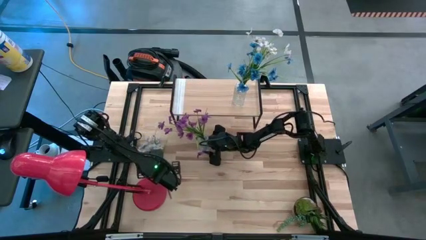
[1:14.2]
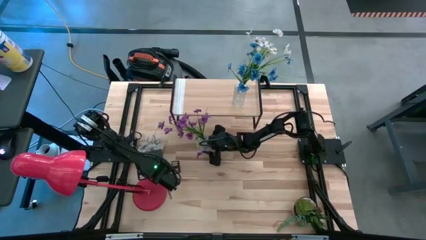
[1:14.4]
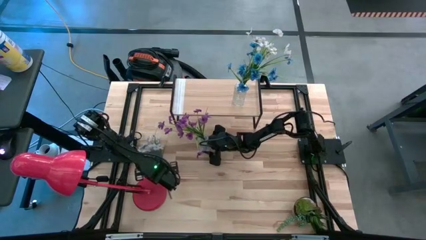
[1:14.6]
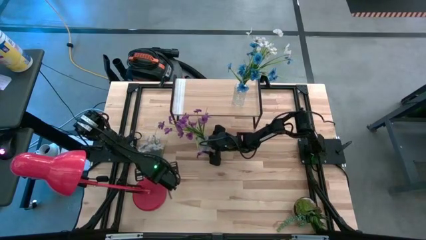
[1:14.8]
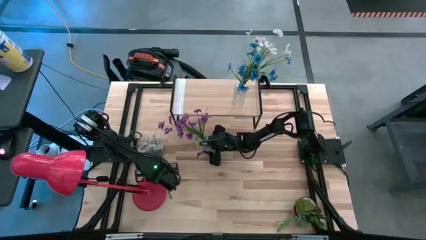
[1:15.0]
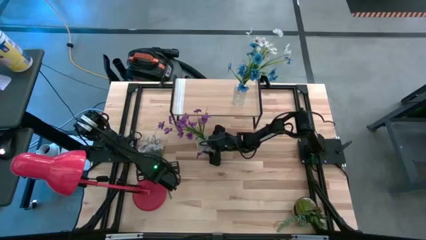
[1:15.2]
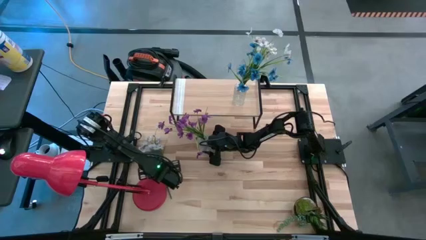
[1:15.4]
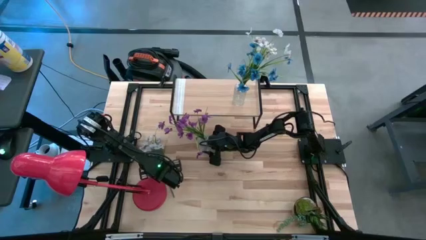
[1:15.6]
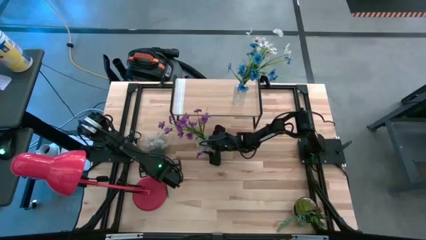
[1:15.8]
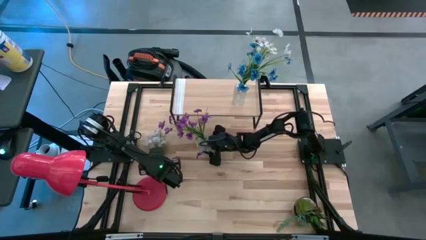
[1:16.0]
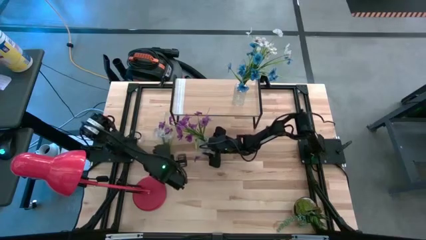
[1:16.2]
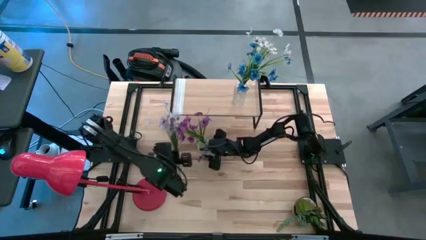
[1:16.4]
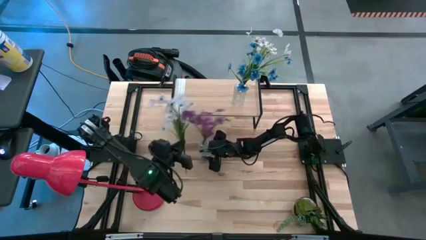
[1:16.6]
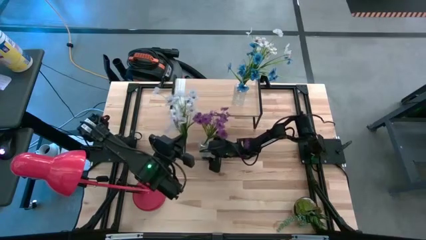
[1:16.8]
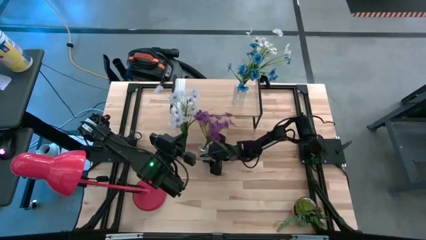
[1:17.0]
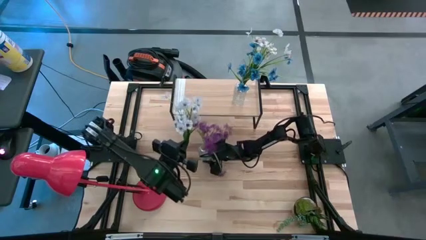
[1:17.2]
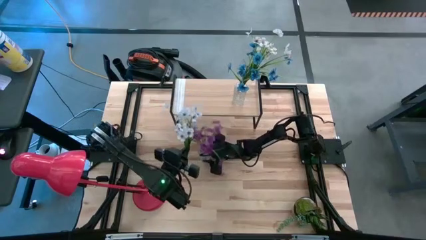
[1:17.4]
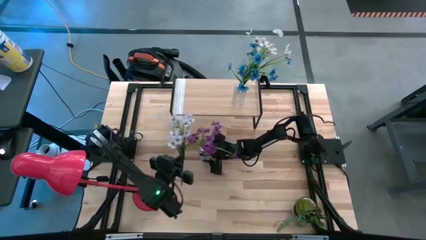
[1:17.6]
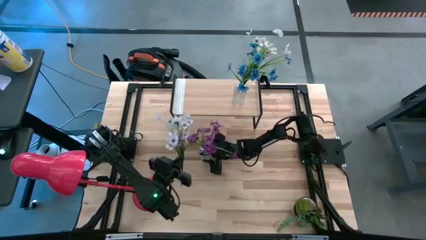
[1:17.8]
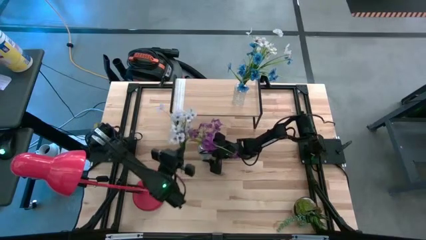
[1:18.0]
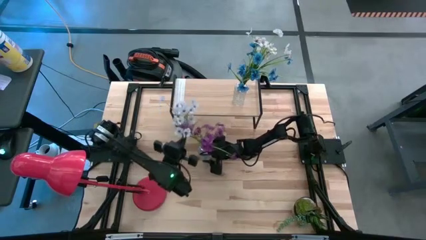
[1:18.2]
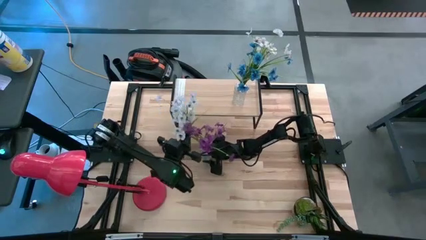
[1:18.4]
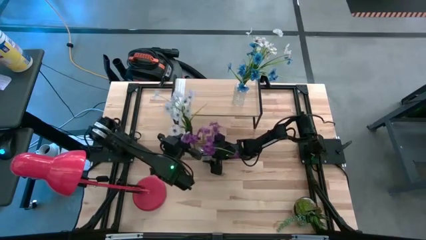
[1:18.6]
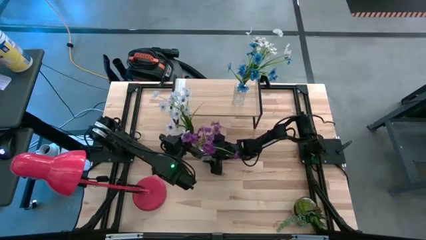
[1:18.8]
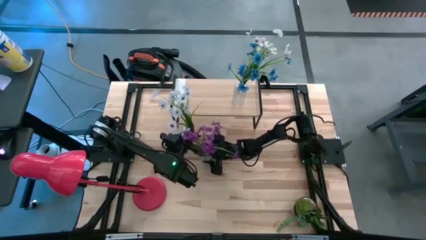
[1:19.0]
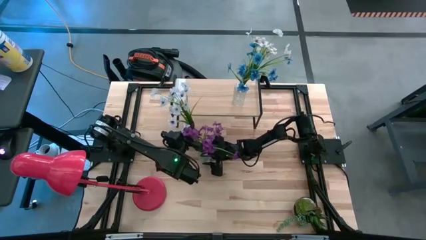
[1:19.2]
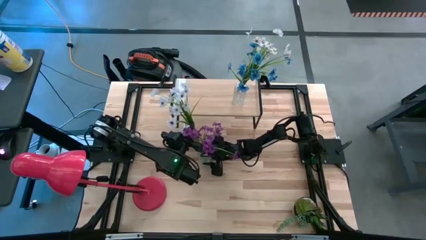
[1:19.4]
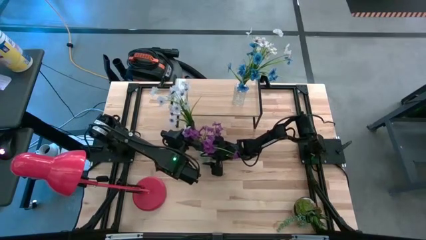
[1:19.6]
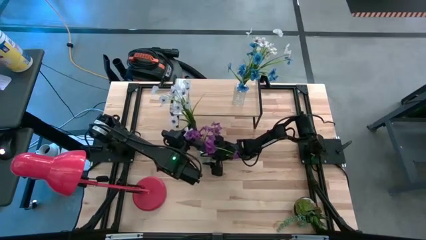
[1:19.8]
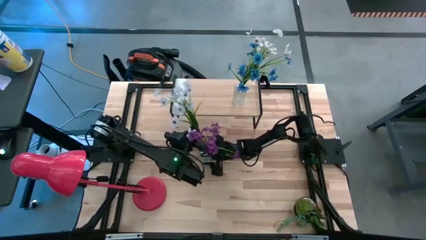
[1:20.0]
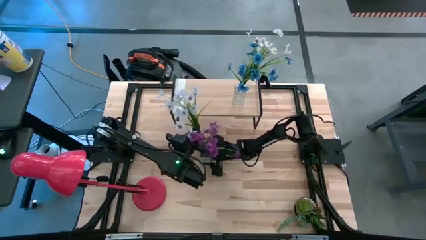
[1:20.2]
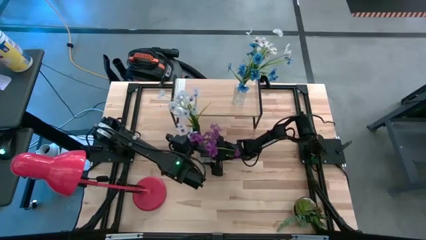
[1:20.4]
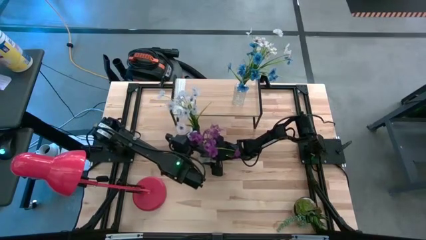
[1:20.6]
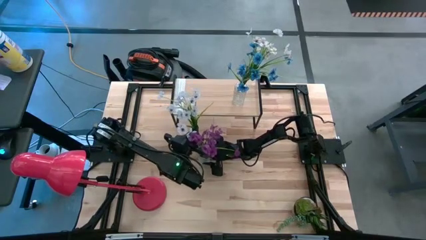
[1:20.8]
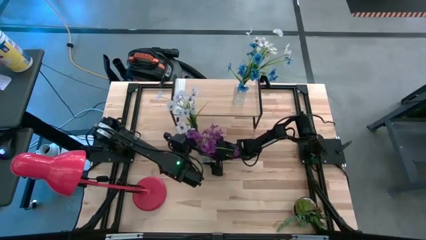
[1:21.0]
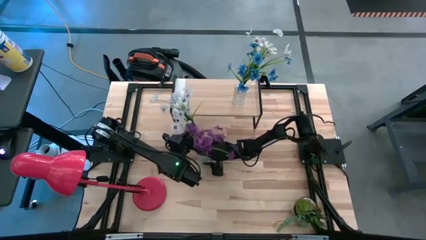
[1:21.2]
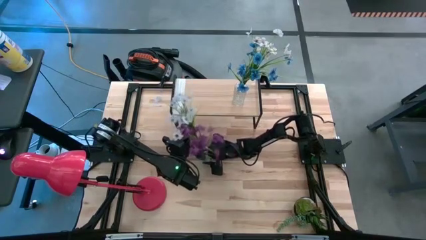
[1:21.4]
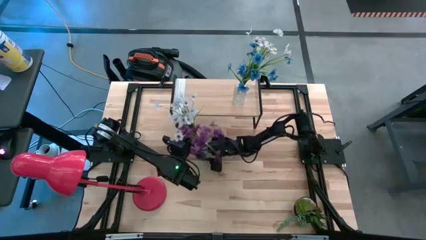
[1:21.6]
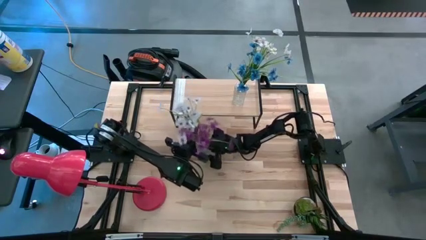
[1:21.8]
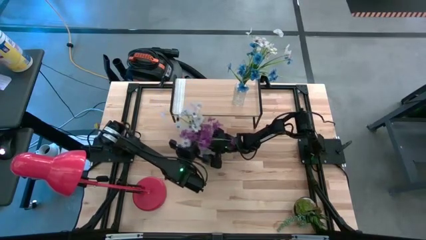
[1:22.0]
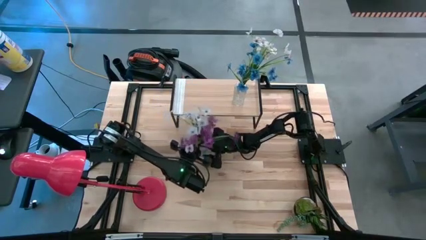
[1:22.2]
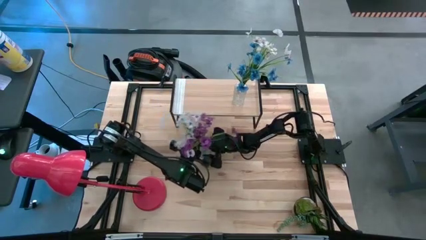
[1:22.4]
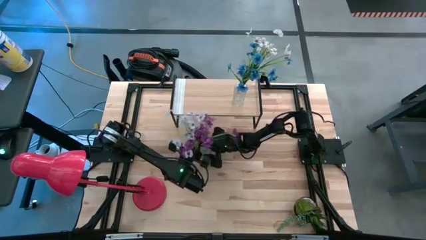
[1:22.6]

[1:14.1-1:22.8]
Task: Pick and place flowers into a vace then onto a shelf
Put the white flowers into the transparent vase

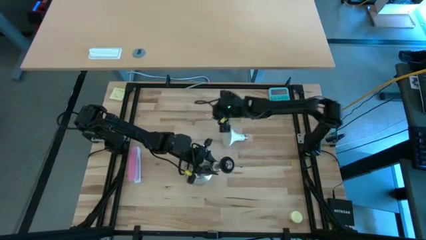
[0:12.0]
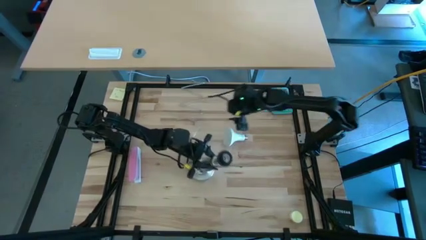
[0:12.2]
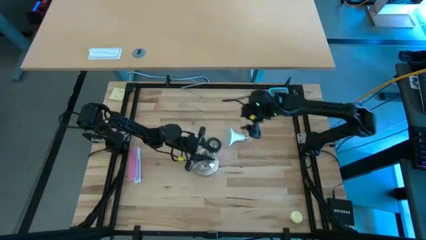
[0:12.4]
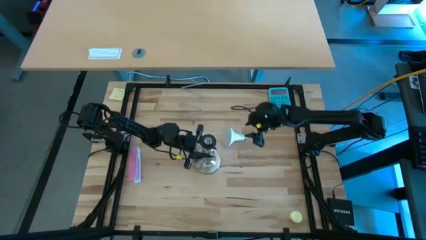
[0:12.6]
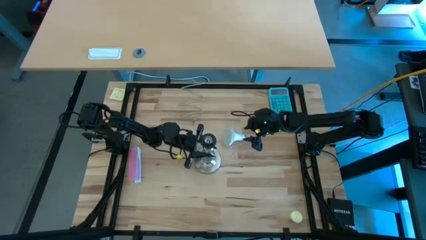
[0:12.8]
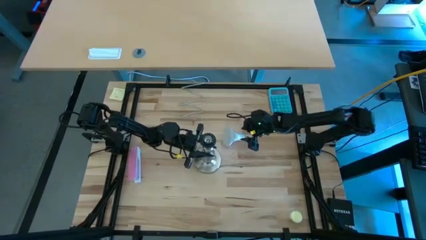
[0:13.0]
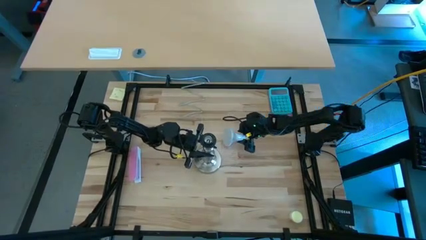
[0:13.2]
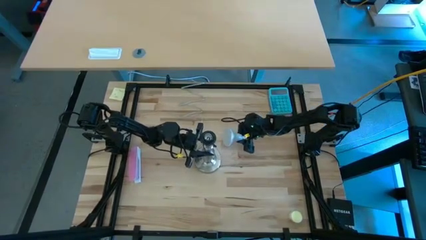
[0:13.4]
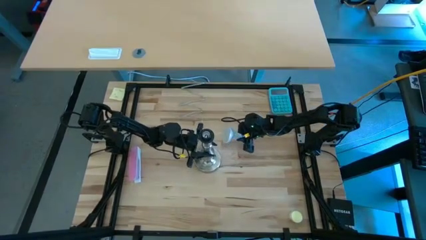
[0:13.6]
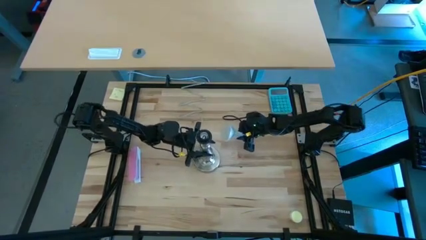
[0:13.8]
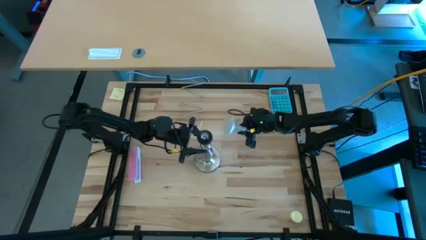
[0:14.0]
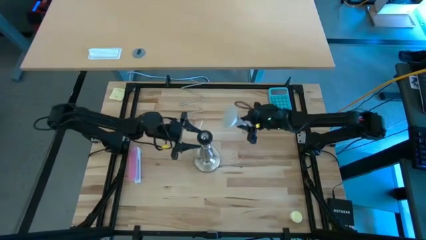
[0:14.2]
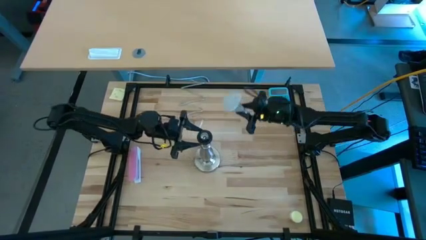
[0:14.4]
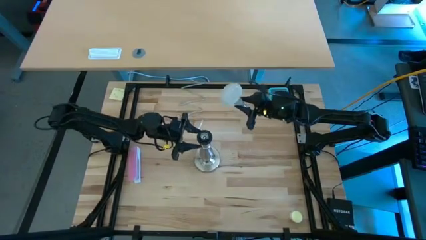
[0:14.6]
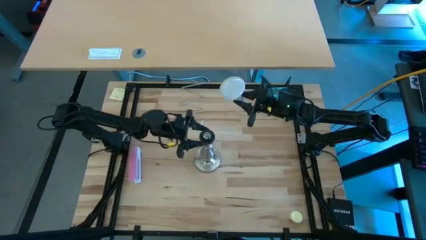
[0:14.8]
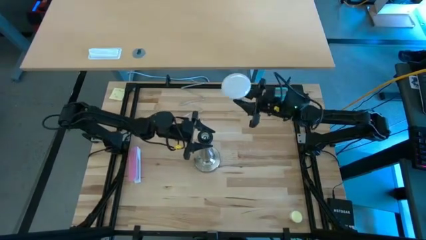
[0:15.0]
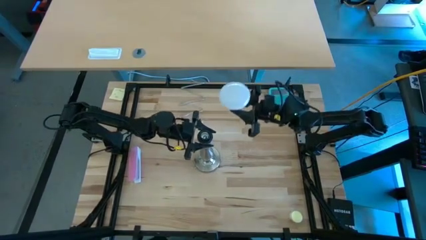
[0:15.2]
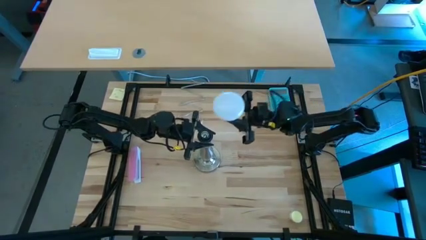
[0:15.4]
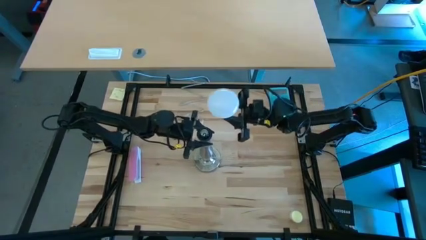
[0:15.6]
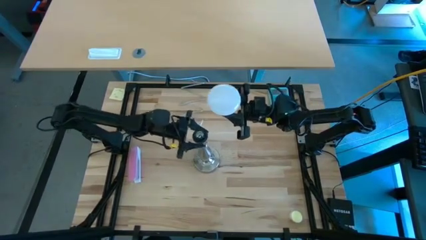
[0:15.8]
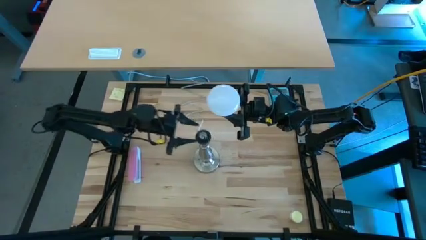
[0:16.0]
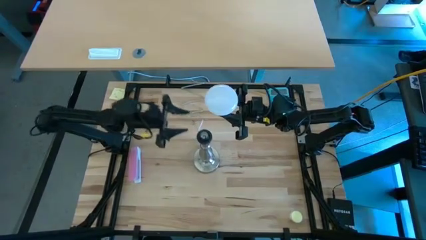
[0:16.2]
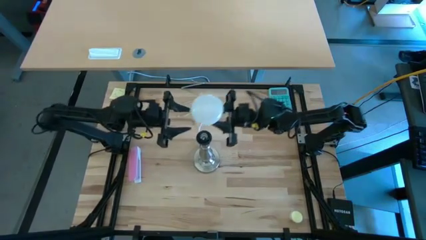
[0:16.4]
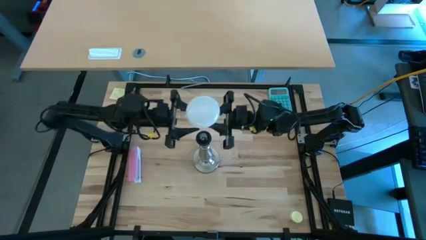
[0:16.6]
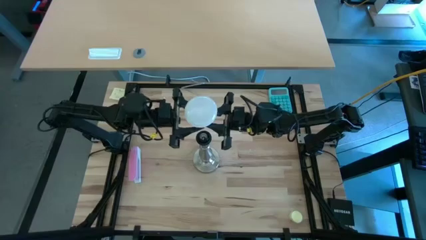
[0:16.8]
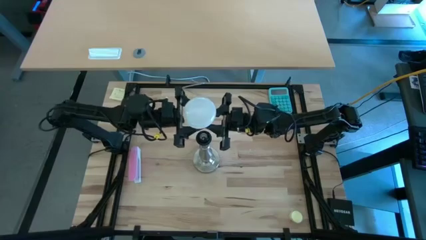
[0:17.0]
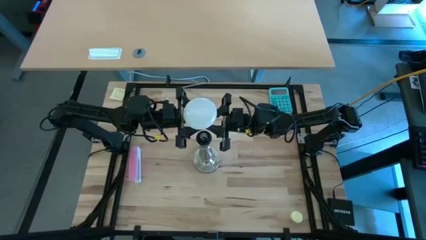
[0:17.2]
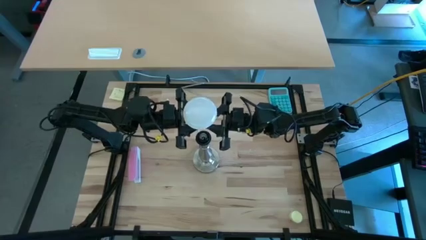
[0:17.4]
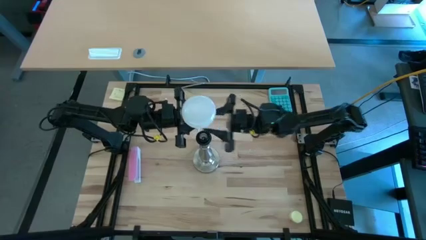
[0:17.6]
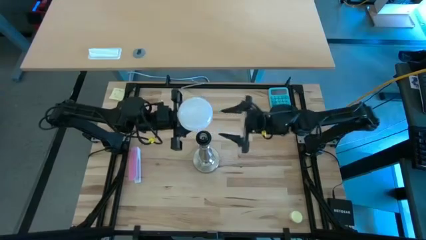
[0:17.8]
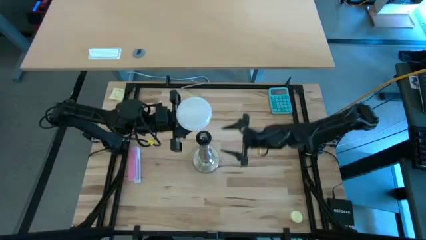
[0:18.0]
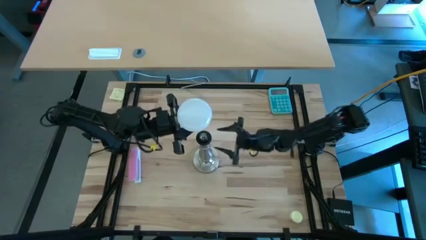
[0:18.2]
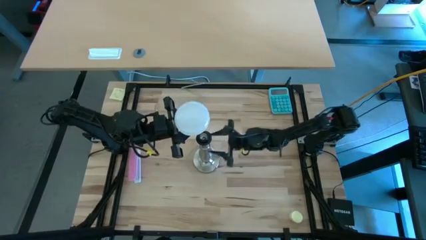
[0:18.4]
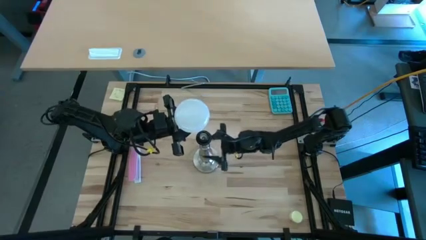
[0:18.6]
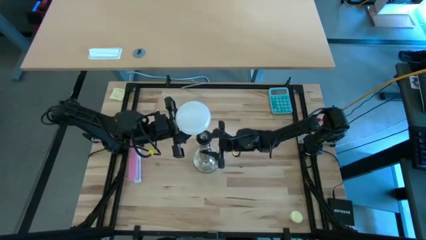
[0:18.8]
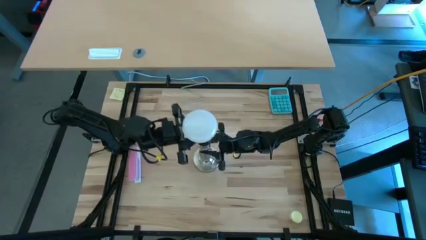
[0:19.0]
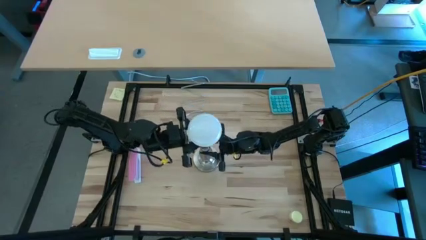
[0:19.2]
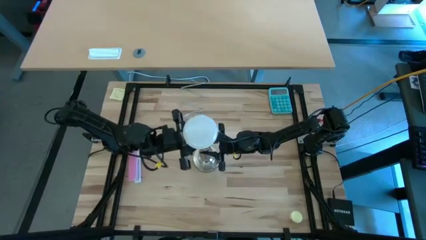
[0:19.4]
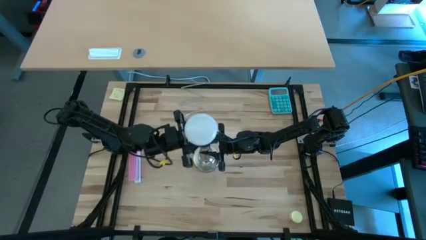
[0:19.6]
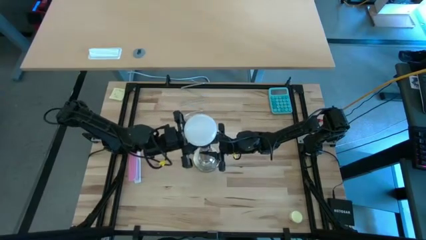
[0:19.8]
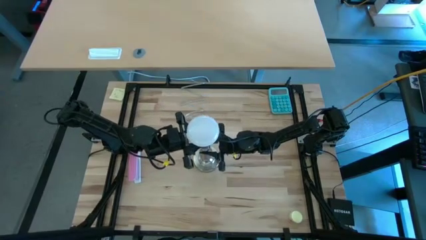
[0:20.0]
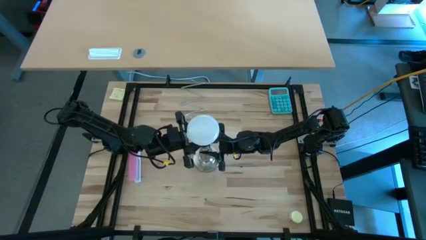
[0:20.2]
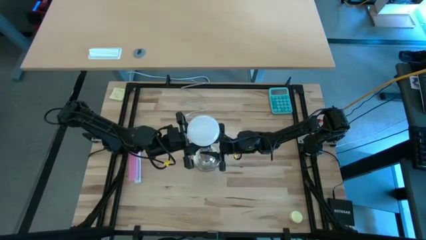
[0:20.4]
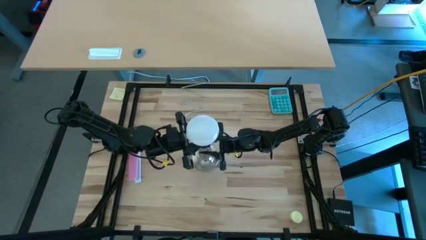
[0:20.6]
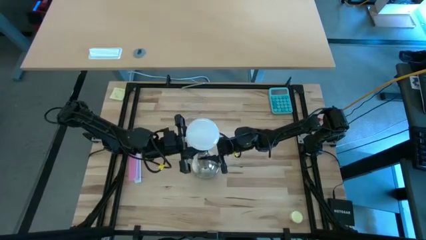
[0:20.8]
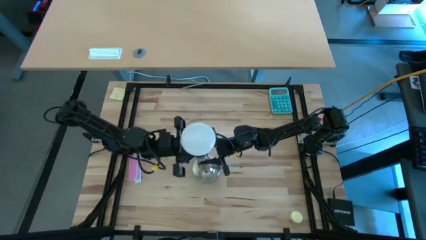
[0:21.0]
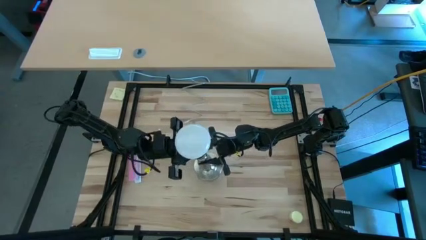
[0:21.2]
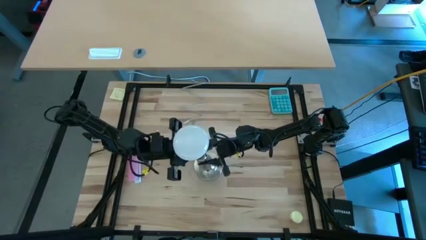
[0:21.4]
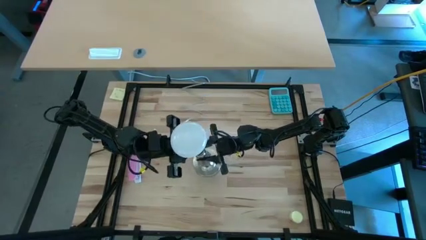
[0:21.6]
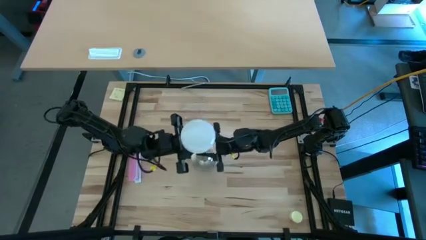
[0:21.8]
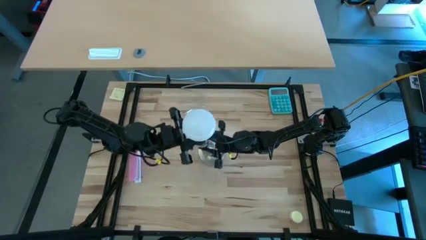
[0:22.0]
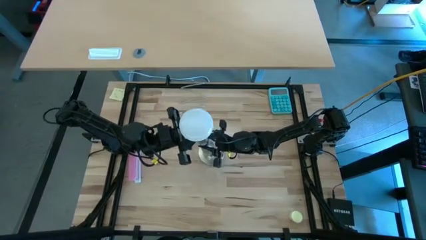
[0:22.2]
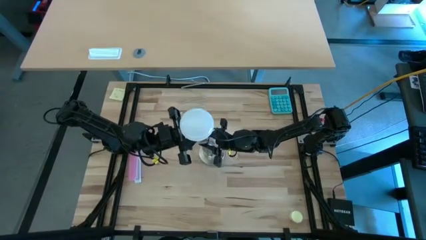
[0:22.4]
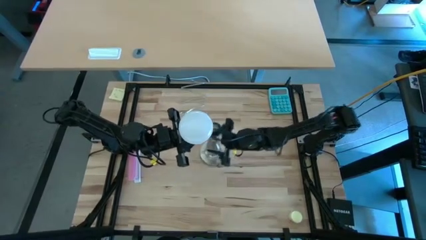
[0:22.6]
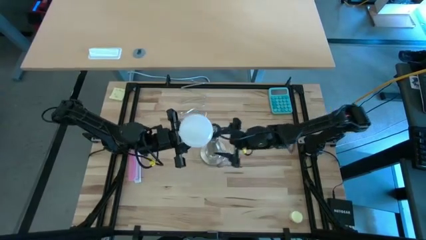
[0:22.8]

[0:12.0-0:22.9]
Task: Screw lightbulb
Insert the white lightbulb on the silver lamp
